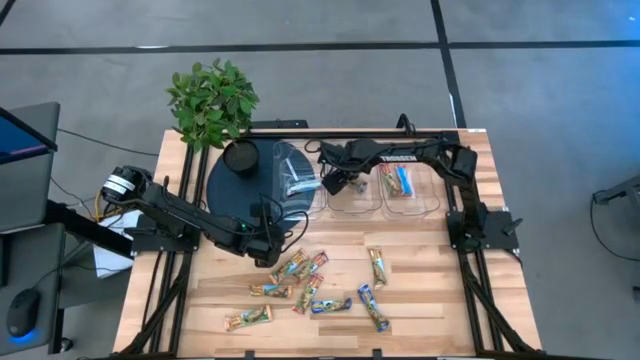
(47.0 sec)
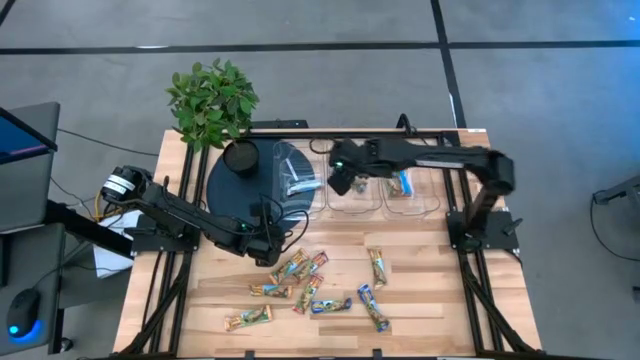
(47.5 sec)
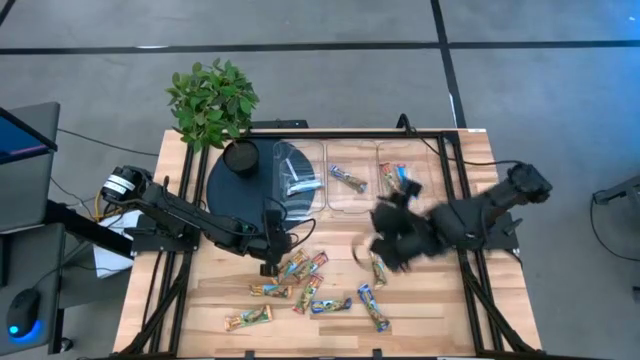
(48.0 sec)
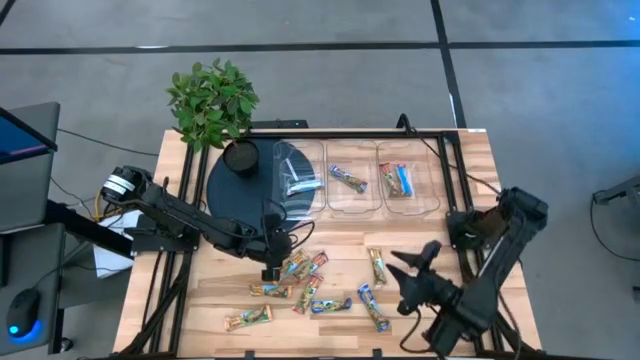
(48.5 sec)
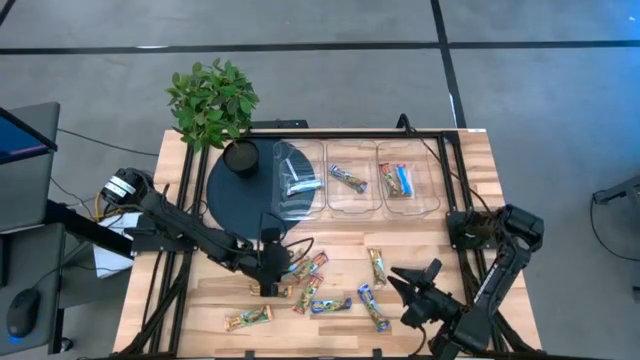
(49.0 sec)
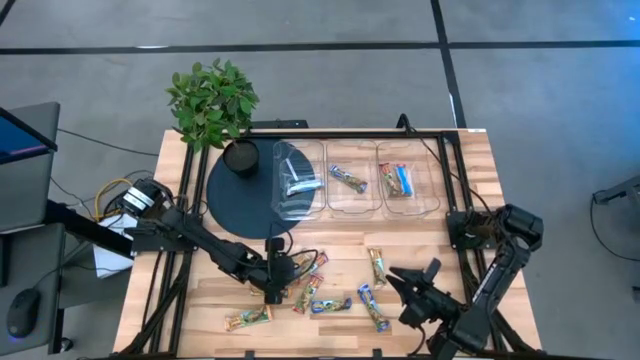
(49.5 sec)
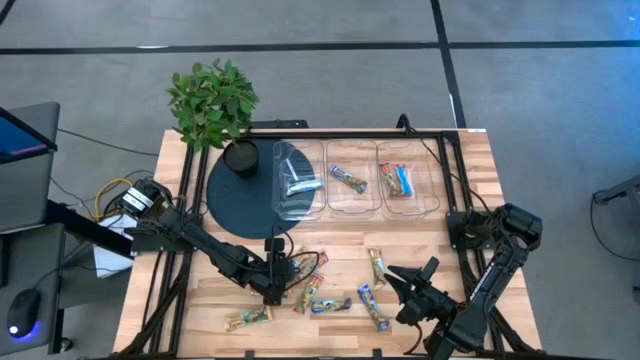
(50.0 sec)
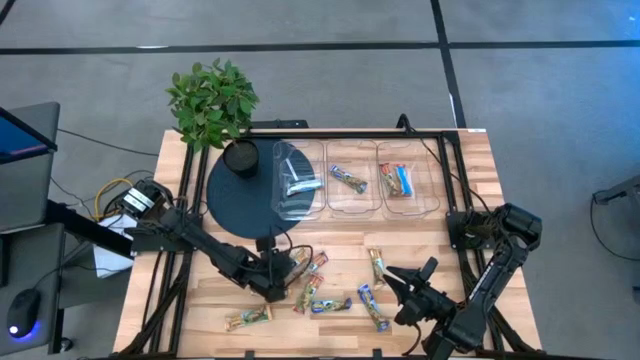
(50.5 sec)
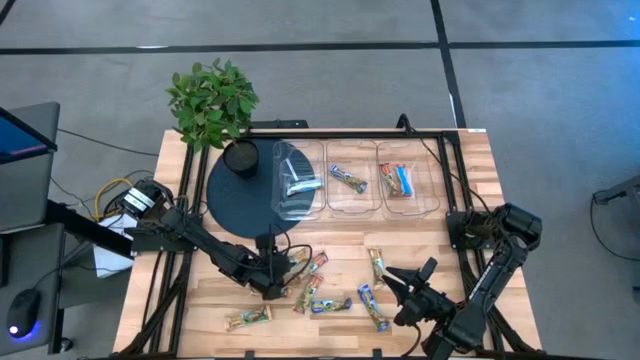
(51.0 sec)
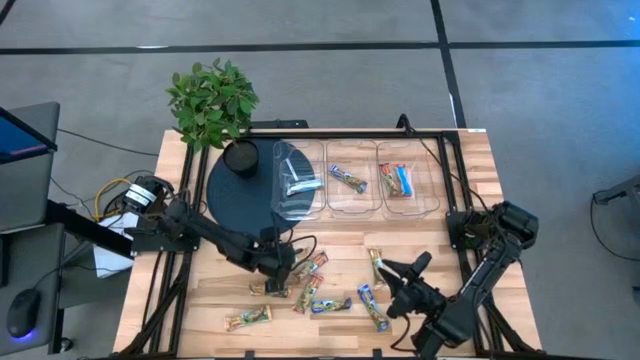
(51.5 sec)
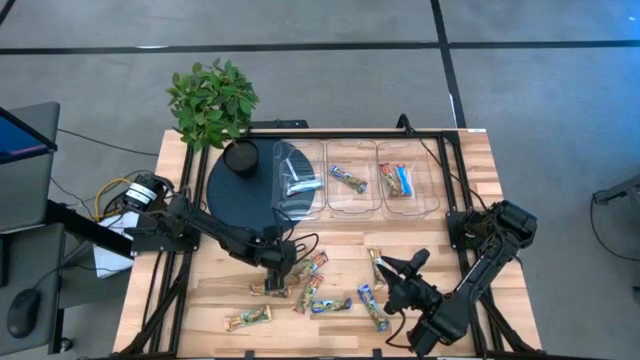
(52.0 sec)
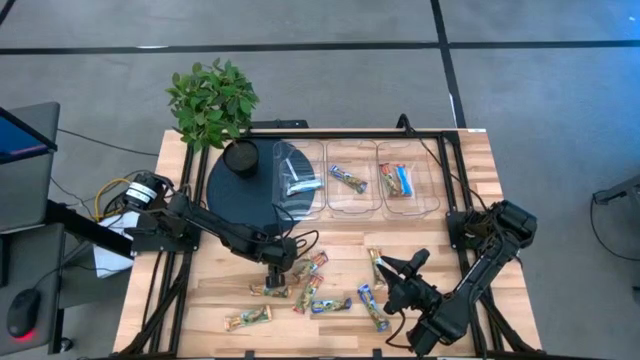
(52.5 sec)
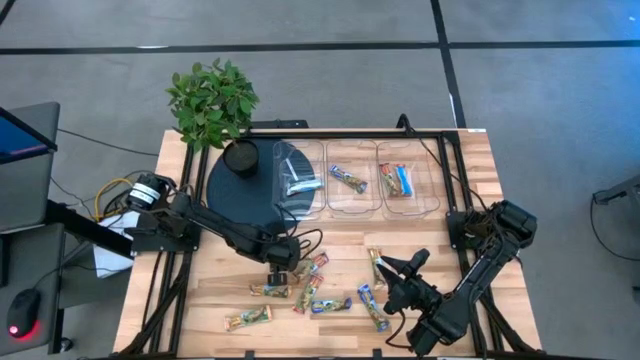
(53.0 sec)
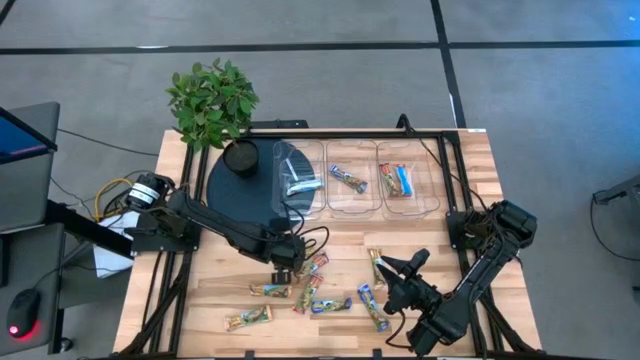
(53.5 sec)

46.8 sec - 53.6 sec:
Task: Pick and place Granola Bars by type
Put the yellow granola bar into the left transparent bin

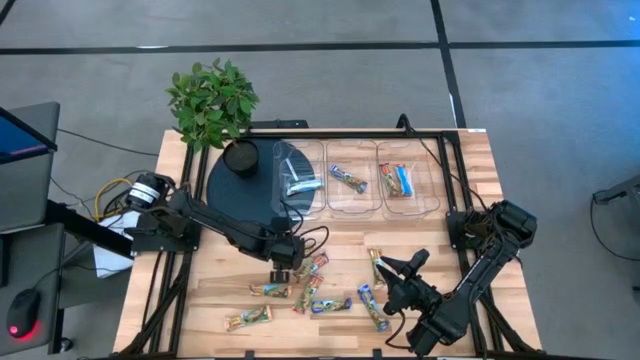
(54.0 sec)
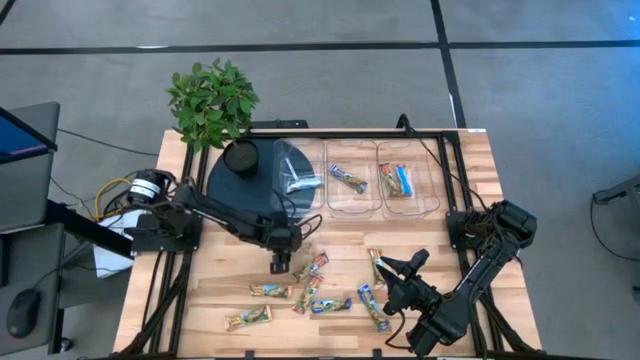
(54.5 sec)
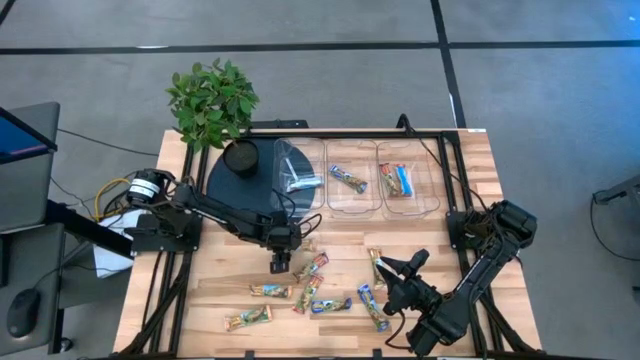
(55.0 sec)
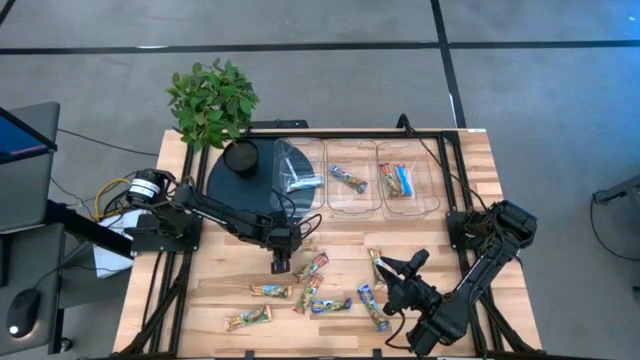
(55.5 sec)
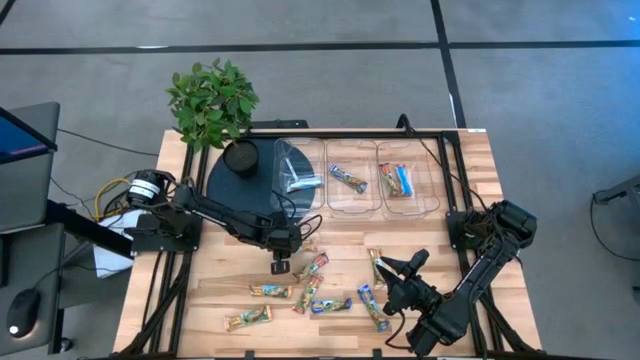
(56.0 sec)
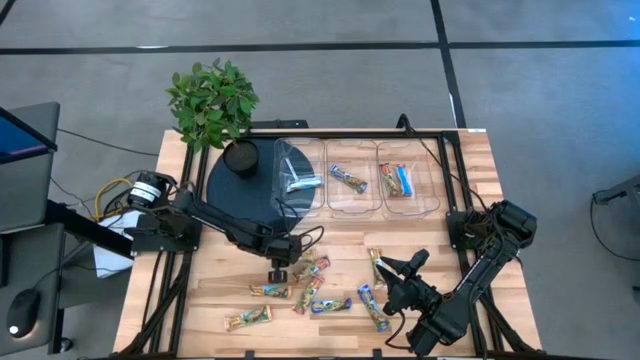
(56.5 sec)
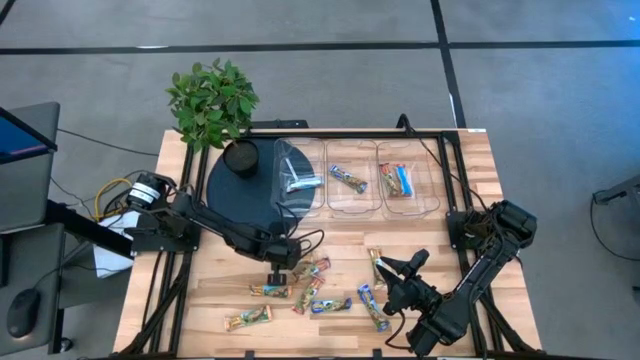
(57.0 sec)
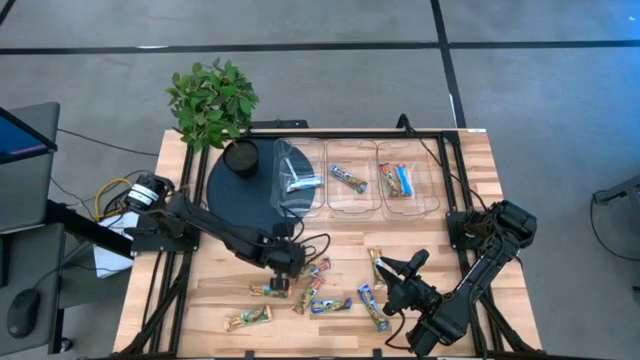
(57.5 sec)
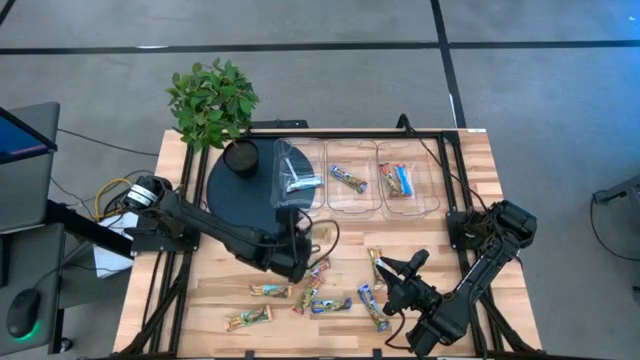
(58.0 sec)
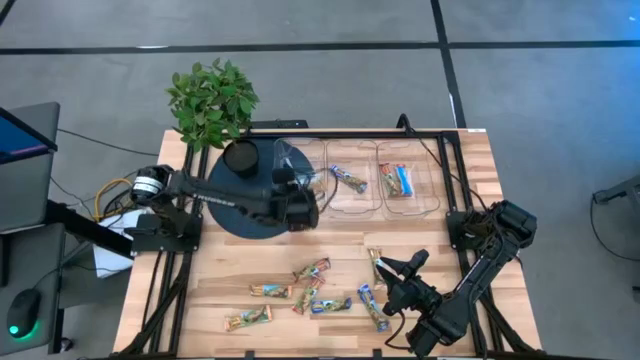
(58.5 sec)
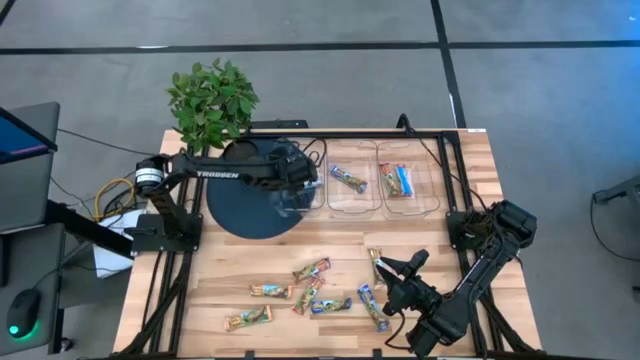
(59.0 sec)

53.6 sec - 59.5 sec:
Put the yellow granola bar into the left transparent bin

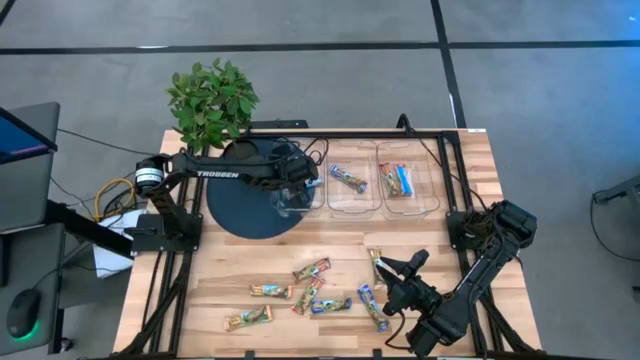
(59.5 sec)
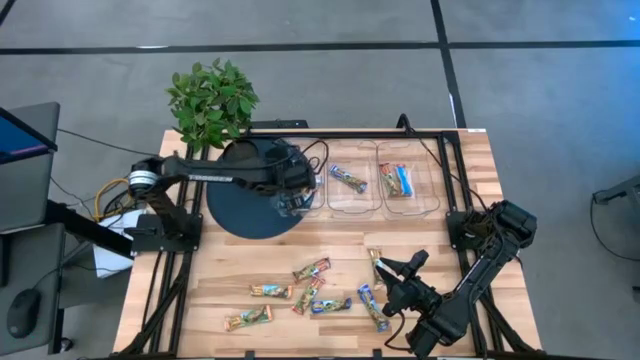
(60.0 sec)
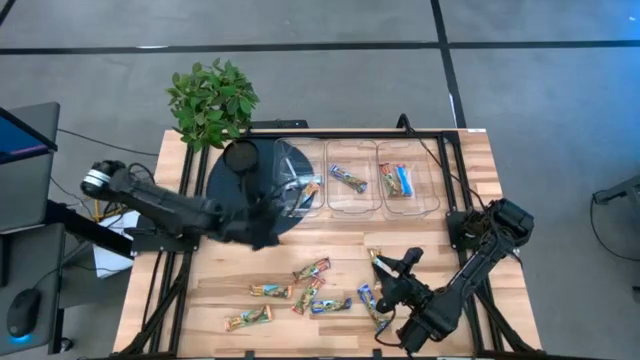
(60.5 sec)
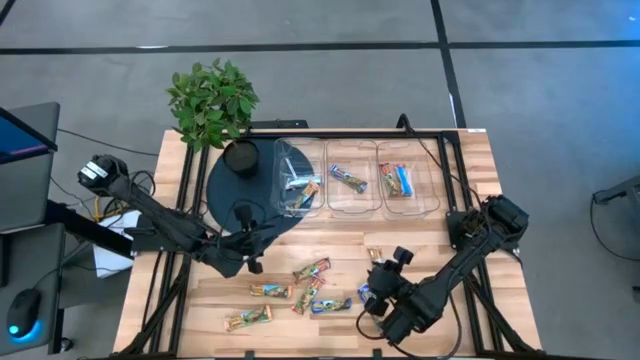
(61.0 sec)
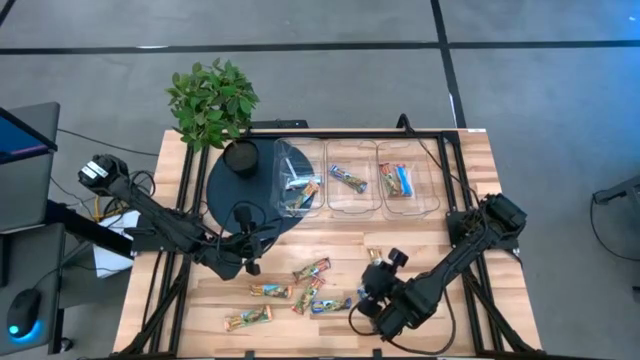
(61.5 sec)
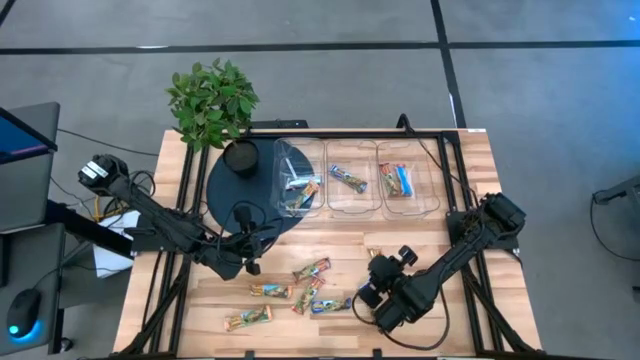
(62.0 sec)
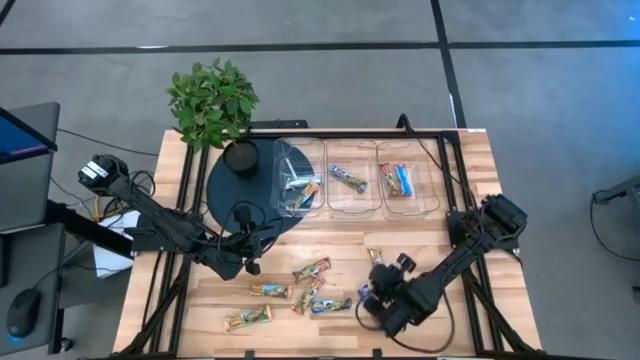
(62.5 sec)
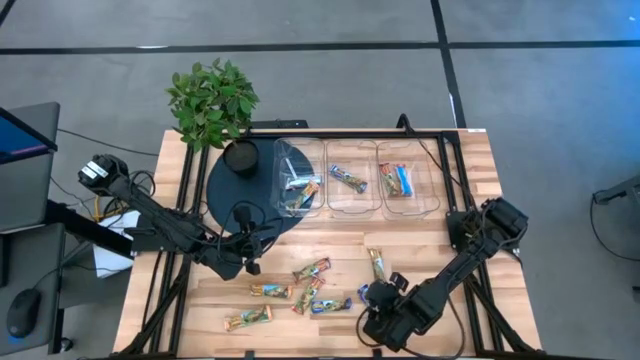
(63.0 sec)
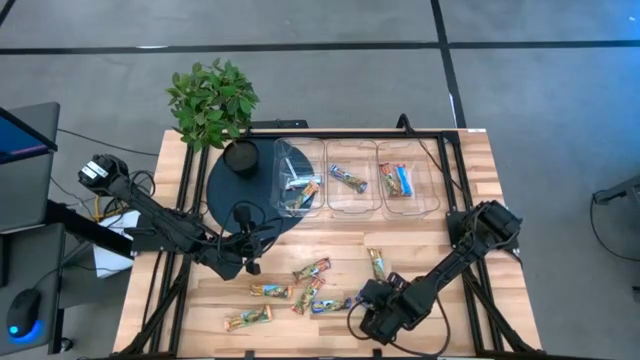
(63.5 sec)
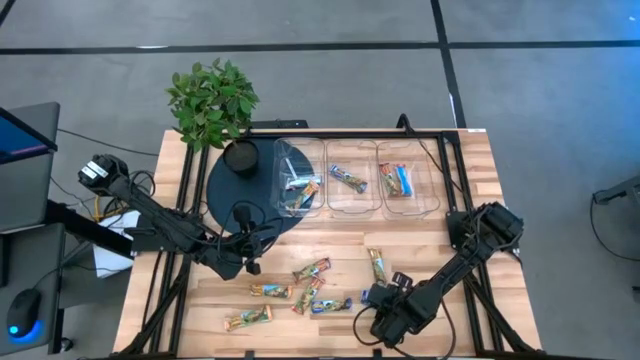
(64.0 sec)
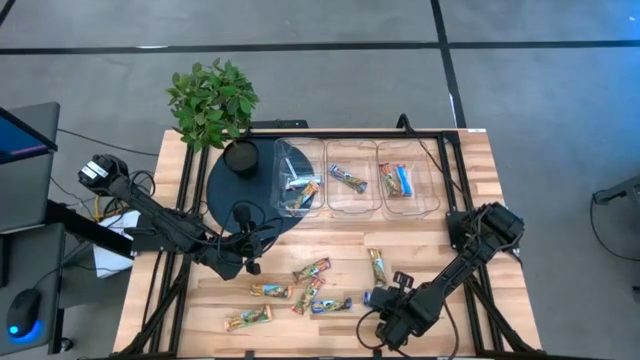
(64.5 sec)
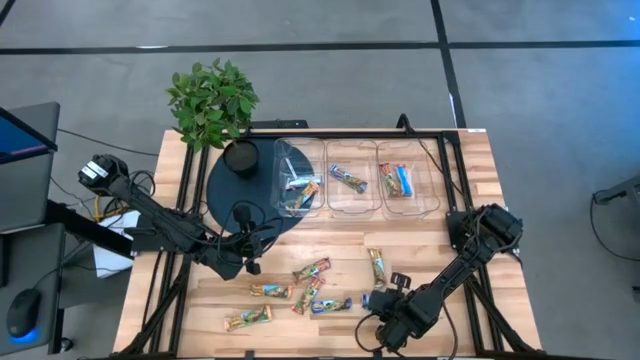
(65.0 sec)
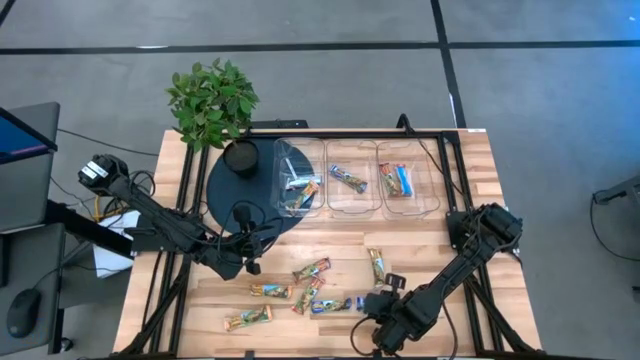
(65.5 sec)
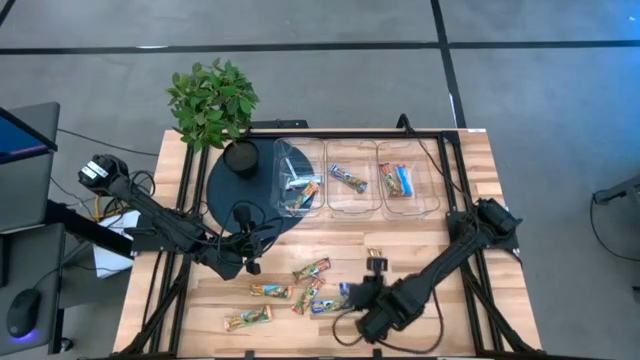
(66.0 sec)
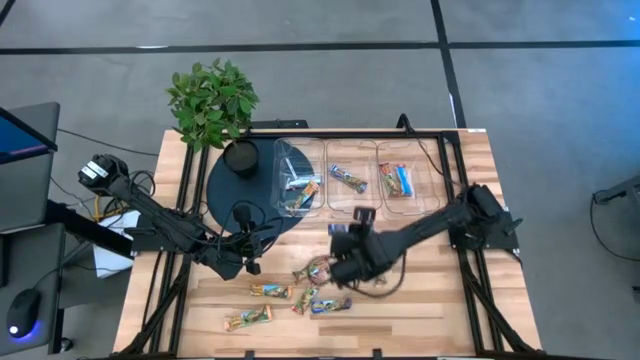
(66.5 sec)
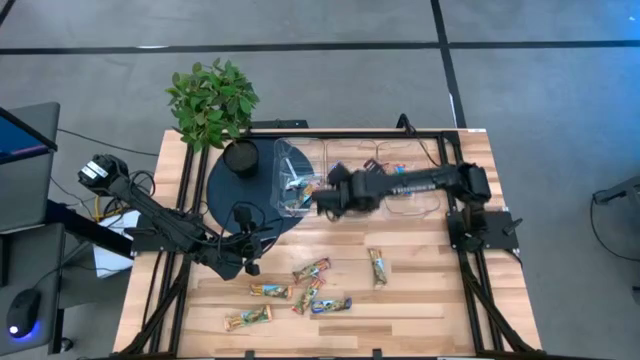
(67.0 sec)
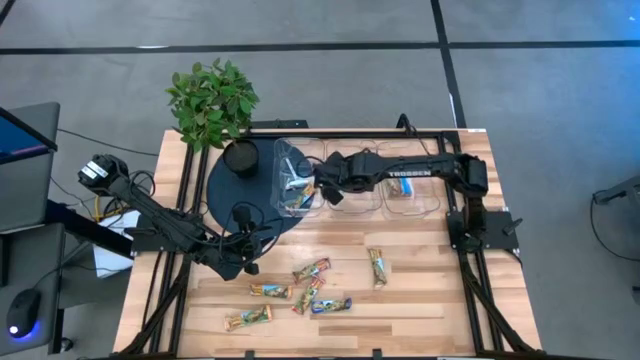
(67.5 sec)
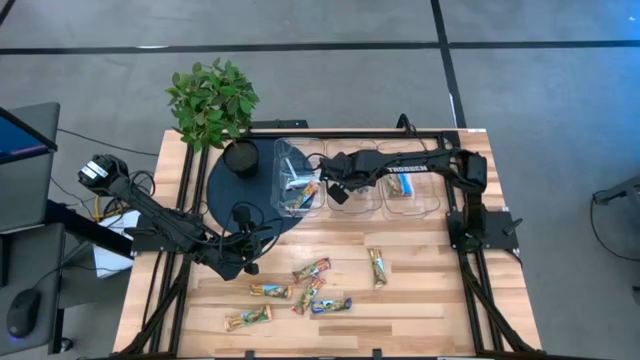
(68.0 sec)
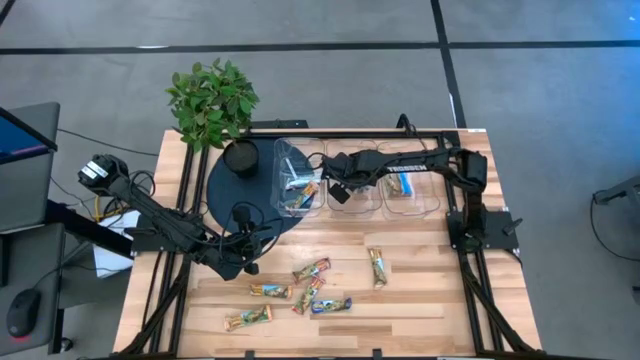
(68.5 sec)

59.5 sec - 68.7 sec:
Put the blue granola bar into the middle transparent bin
